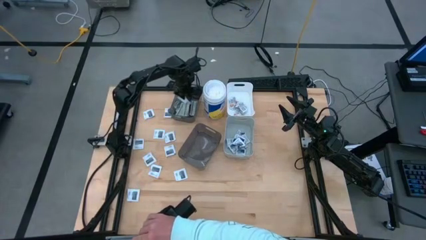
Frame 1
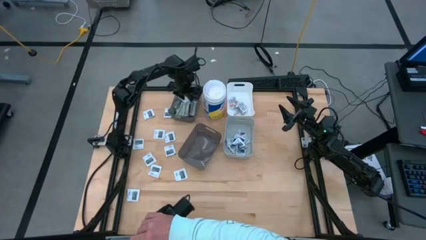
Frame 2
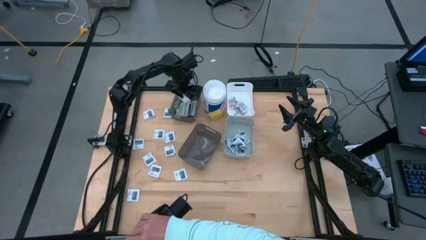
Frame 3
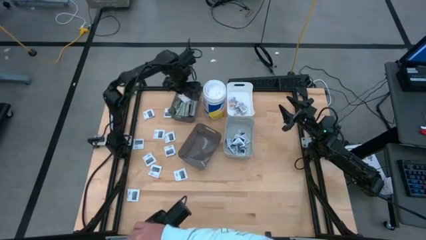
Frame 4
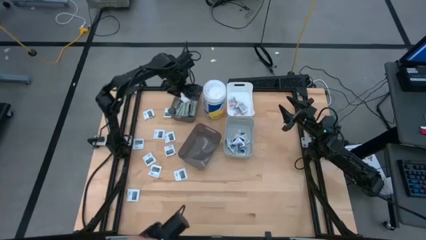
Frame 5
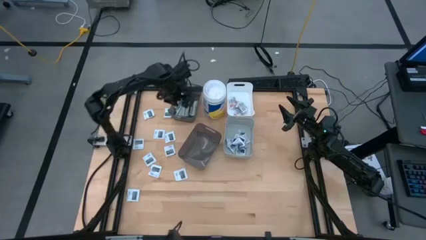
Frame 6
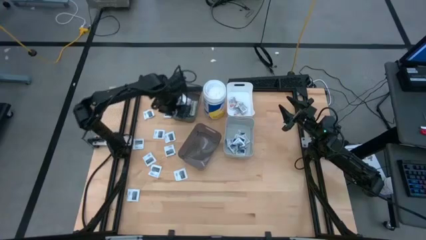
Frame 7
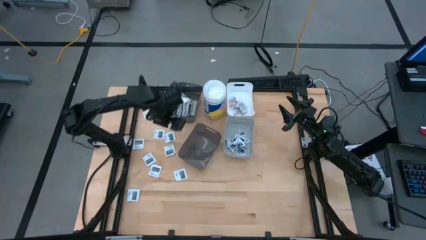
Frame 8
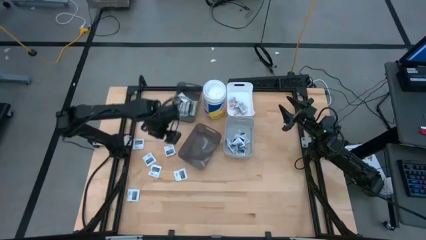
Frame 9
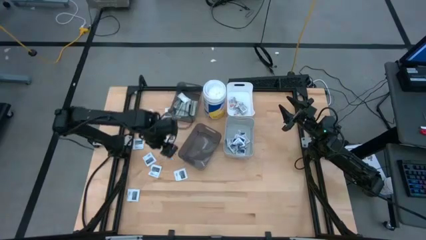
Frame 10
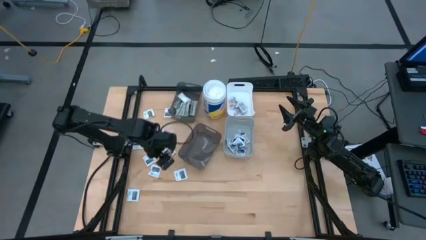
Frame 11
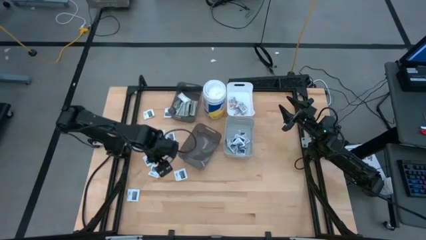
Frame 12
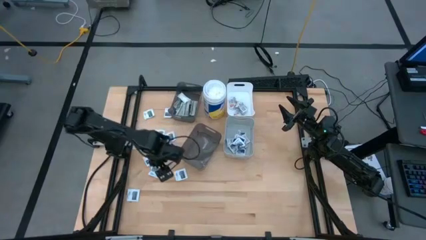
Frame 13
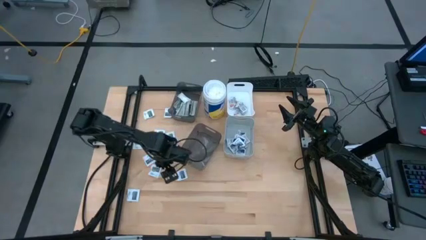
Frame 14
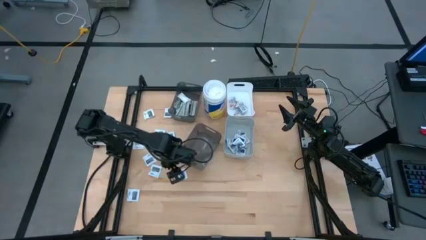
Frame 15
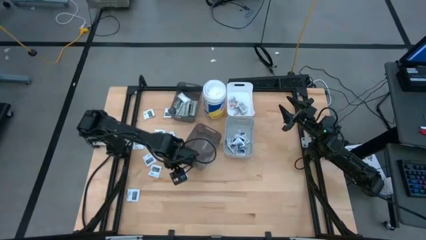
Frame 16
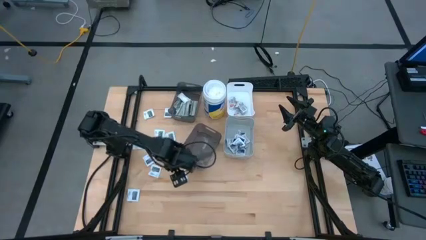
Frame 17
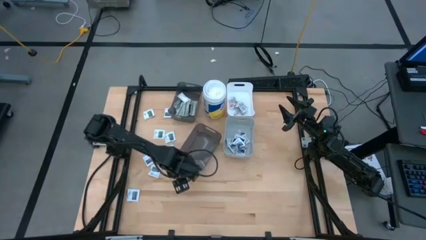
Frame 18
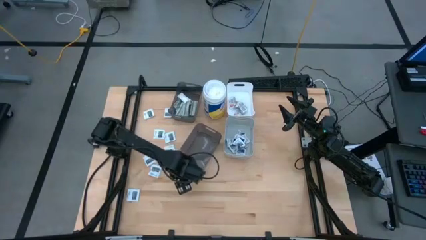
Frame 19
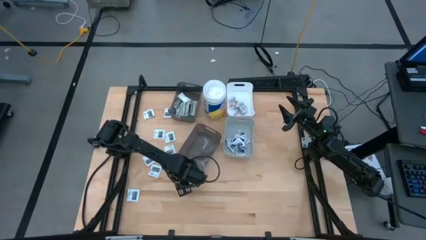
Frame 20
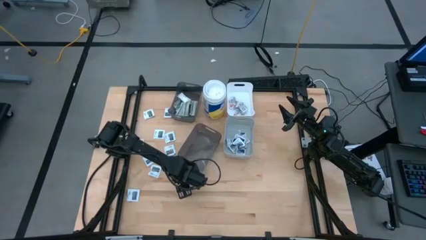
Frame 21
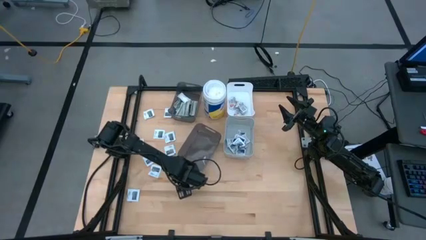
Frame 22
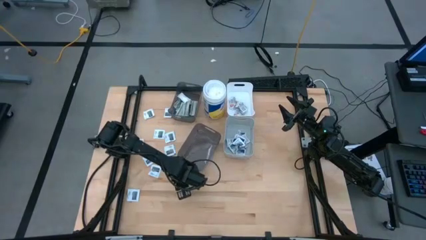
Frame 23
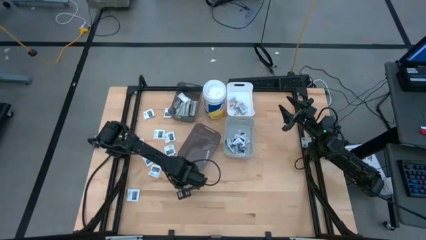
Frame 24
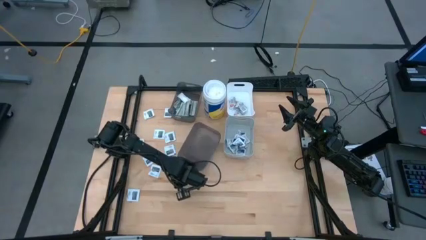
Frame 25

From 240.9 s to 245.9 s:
Task: Pick & Place First Aid Supplies
Put the towelette pack into the bottom black bin

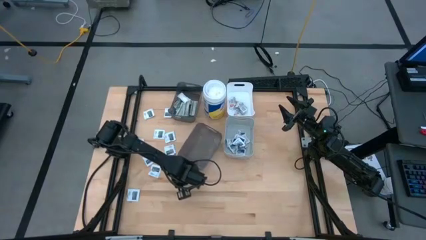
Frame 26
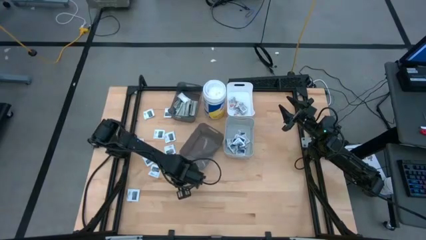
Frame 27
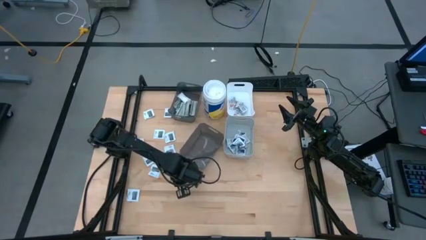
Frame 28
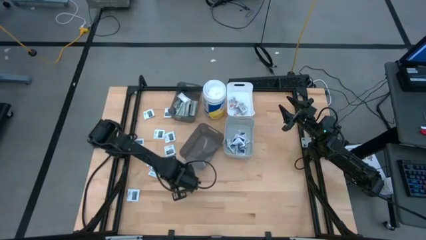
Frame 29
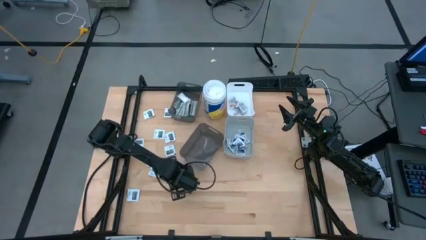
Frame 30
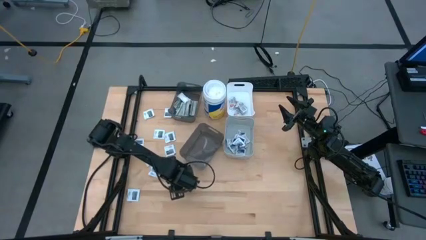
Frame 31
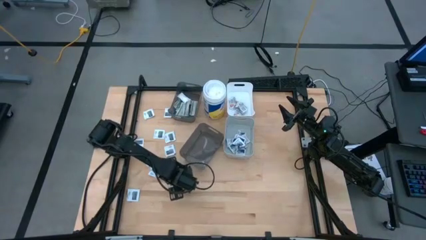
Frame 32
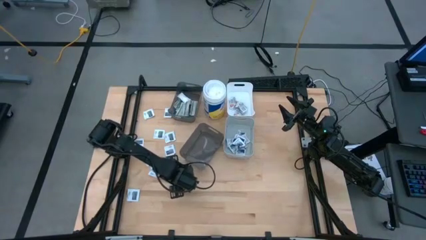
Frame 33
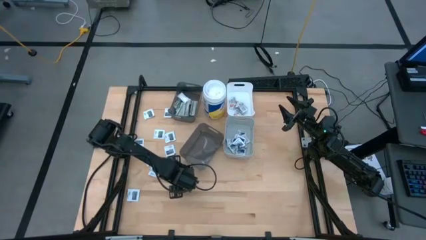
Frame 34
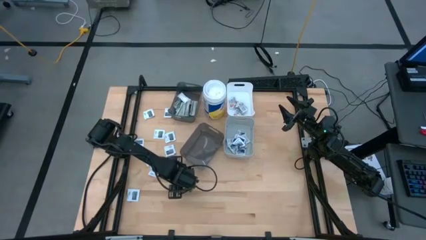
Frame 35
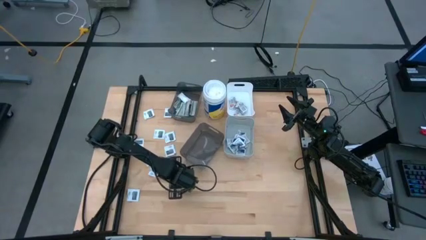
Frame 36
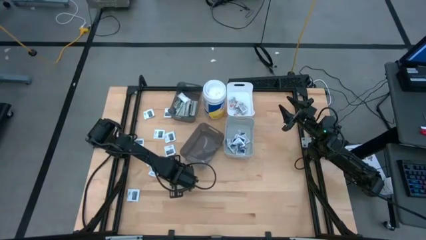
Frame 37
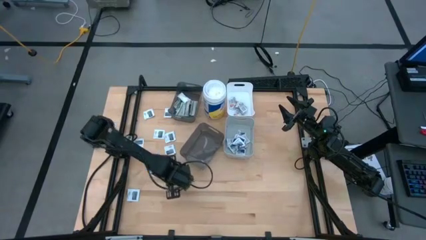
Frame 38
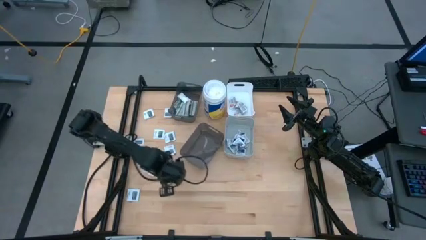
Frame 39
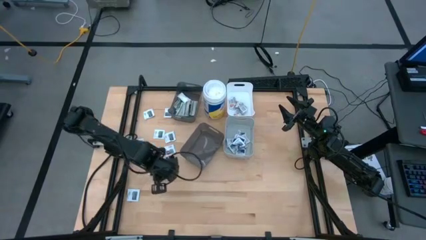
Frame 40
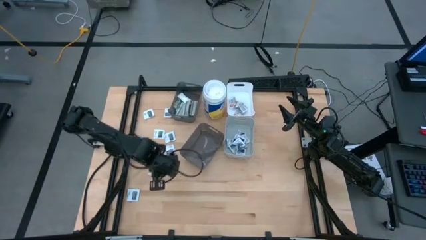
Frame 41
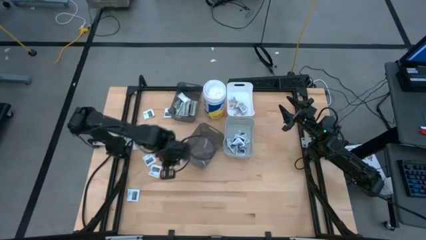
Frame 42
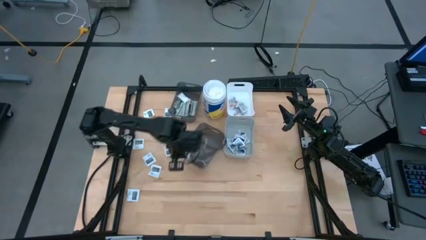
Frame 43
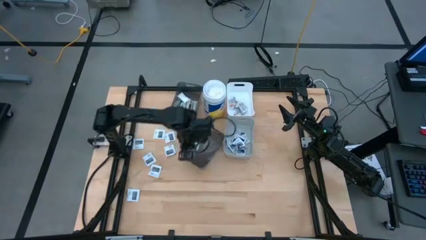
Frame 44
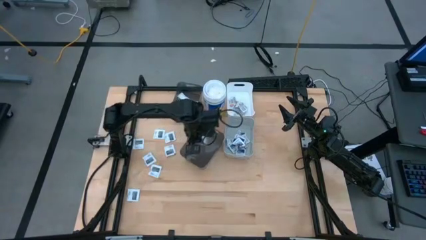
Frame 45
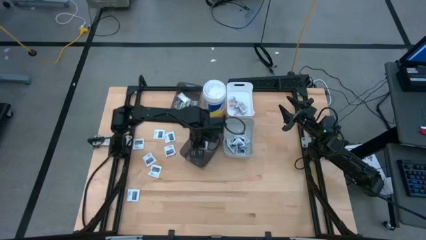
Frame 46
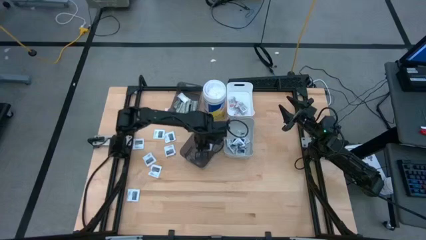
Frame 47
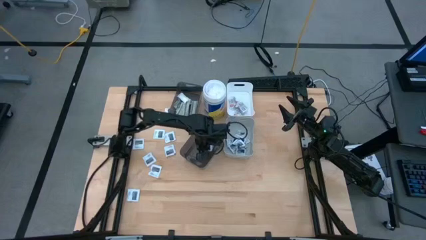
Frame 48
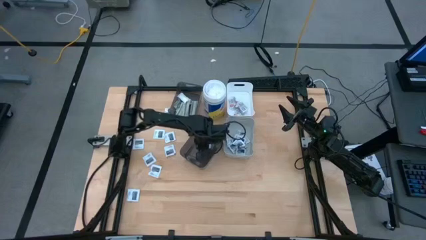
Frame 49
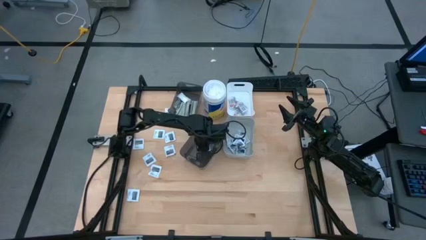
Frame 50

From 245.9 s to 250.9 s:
Put the towelette pack into the bottom black bin

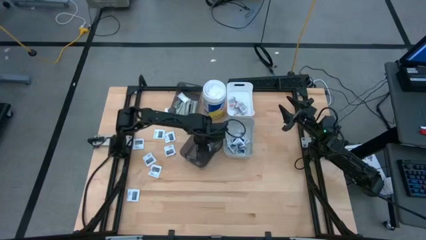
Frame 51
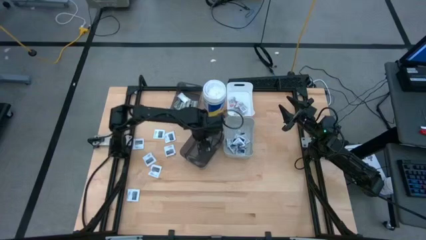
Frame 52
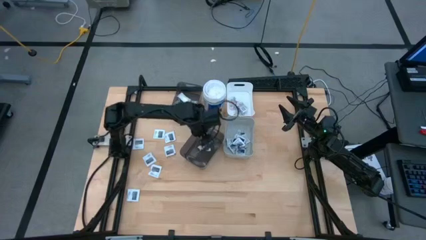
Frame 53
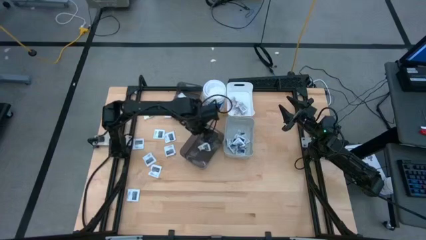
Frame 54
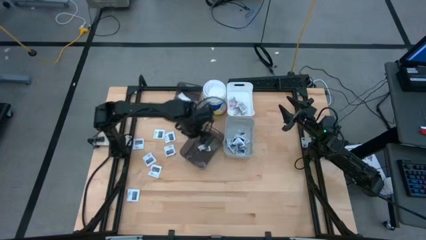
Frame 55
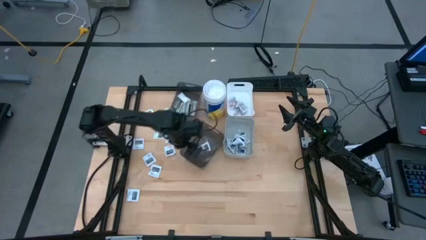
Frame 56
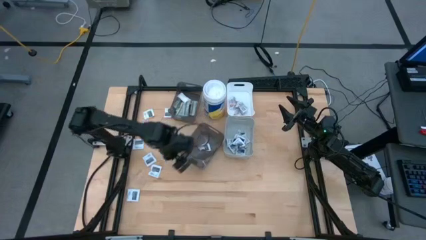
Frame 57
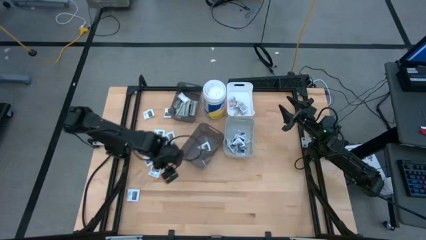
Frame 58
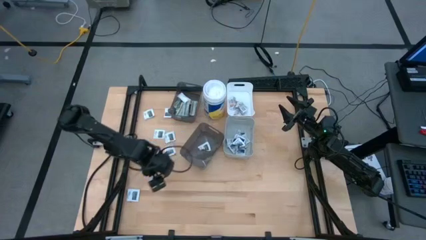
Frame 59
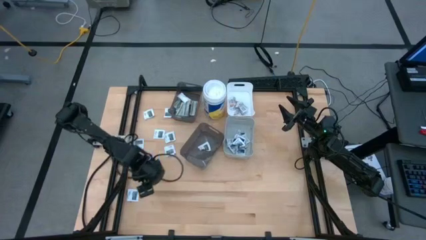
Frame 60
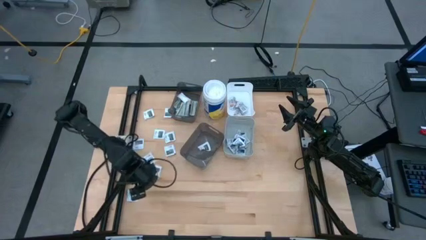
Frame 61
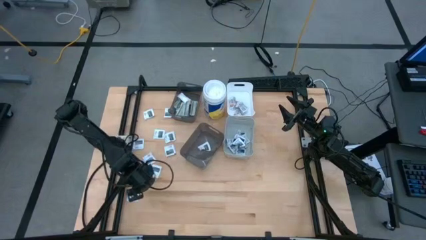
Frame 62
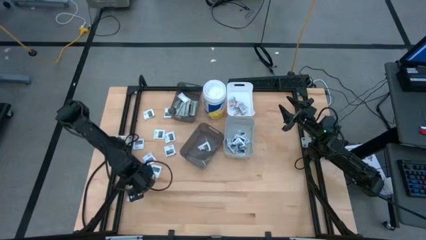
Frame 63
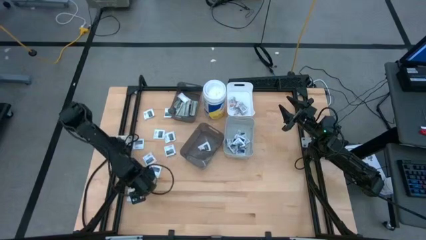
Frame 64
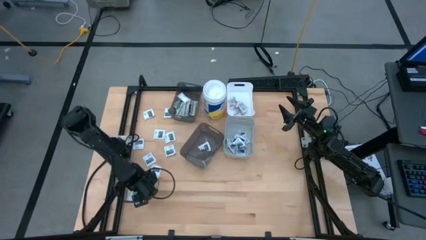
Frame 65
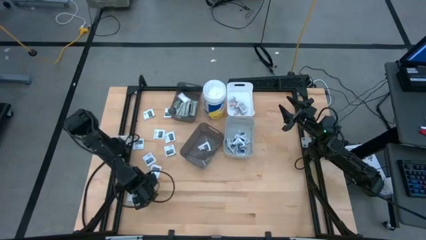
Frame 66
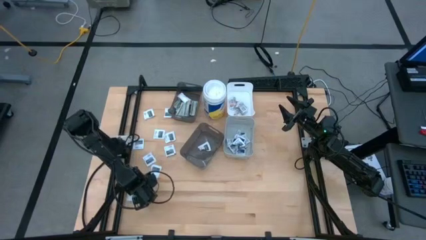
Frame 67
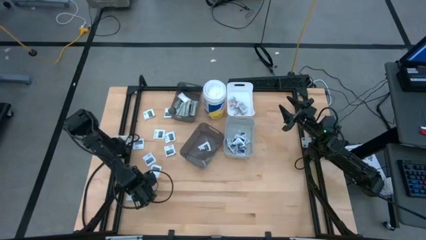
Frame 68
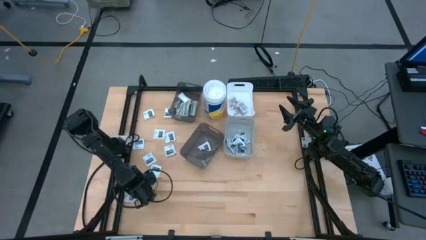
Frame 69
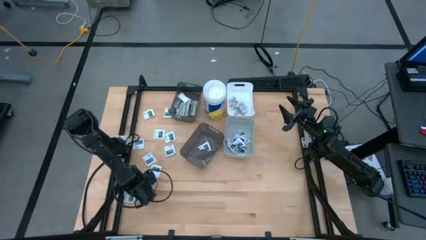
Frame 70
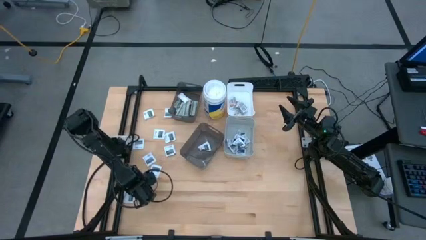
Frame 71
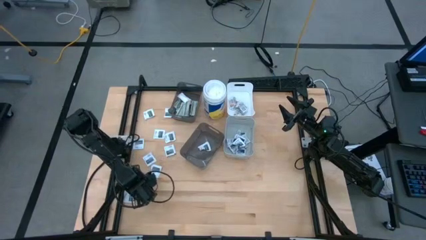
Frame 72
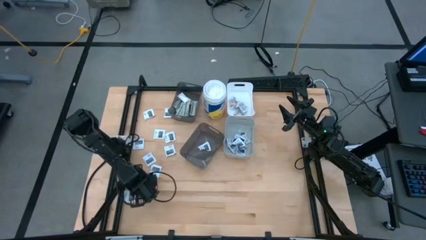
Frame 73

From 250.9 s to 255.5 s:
Put the towelette pack into the bottom black bin

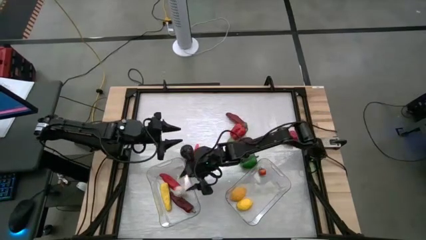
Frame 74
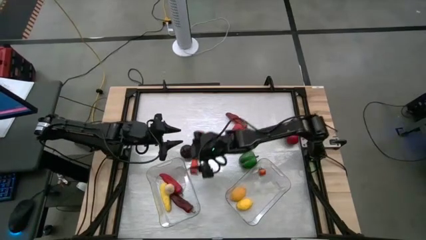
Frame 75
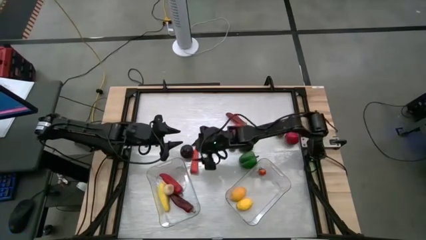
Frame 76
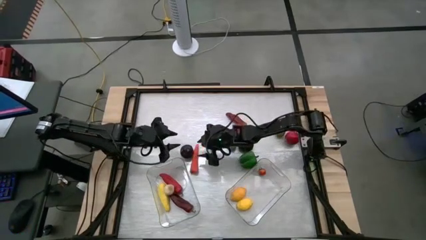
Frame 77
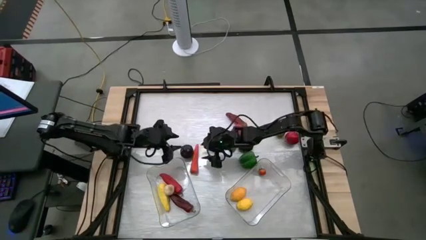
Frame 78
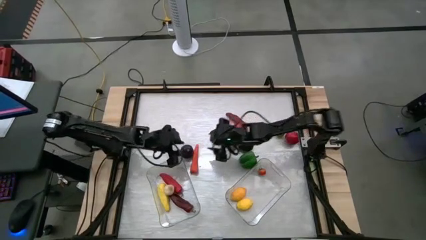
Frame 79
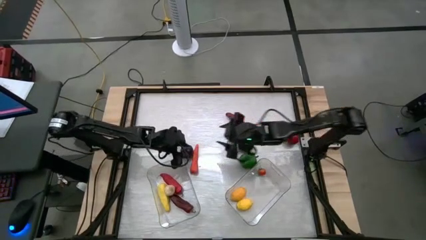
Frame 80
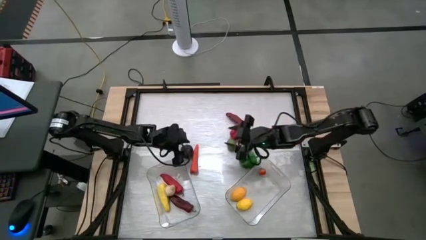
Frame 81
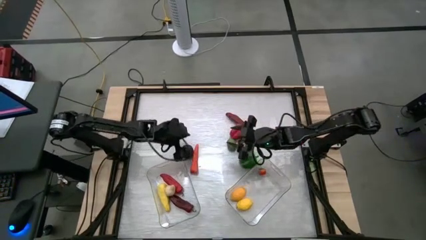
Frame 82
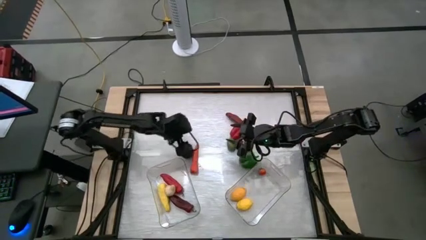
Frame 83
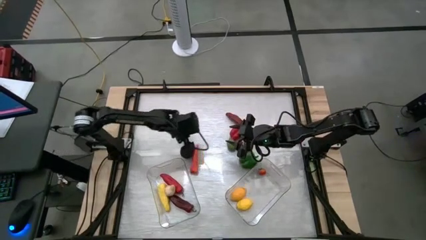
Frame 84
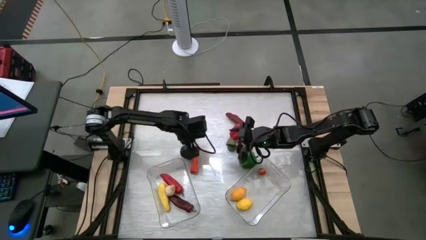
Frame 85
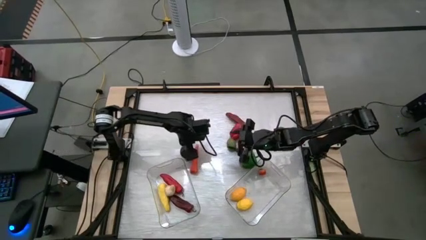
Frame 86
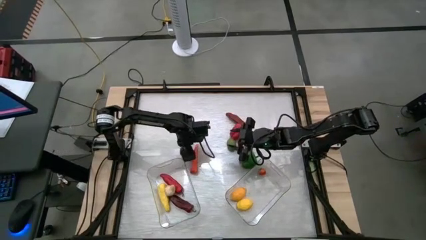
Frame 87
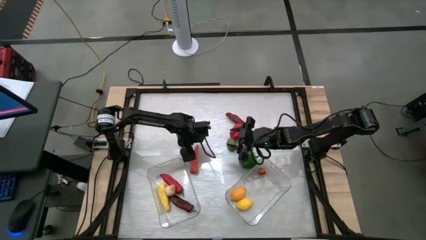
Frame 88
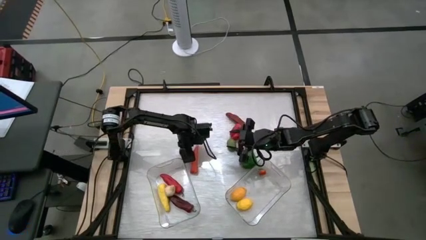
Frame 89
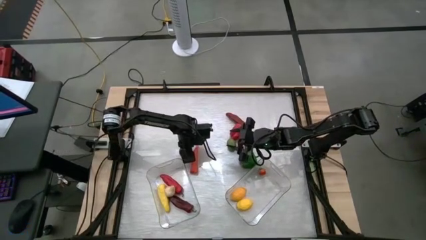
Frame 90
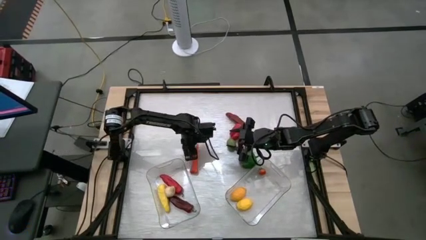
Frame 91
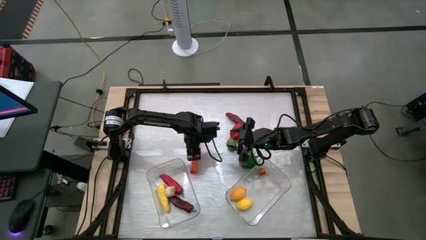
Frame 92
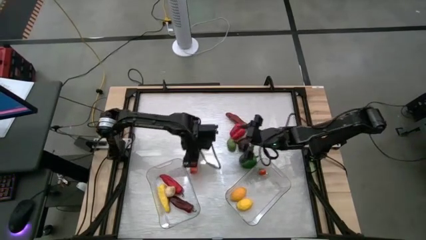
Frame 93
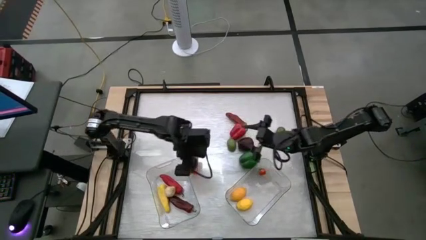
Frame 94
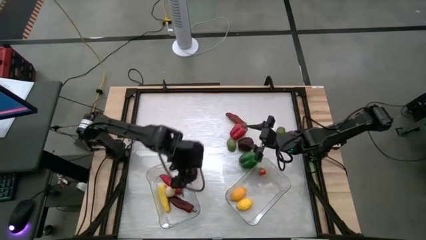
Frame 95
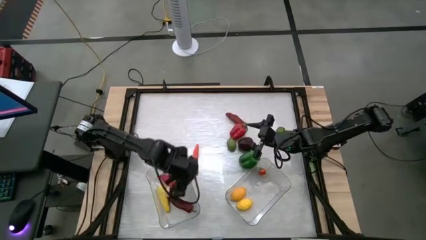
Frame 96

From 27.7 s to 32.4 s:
Task: Sort produce into baskets
Put the plum into the left transparent bin
